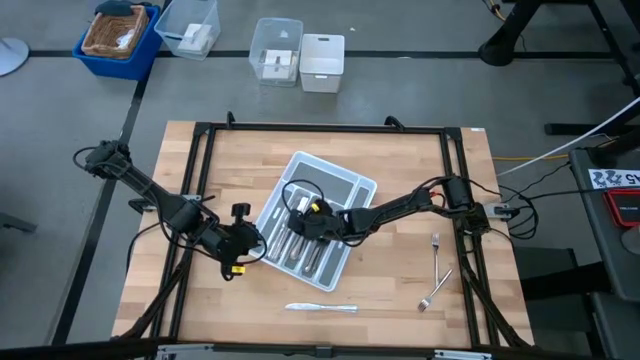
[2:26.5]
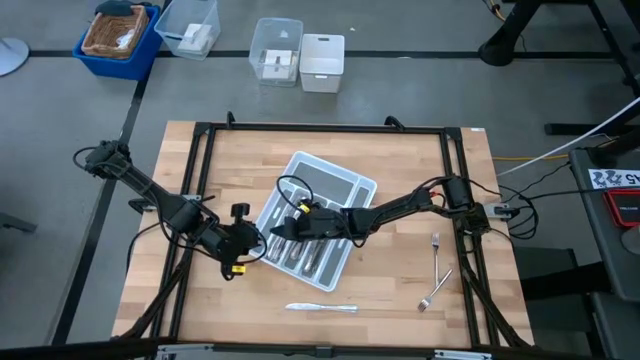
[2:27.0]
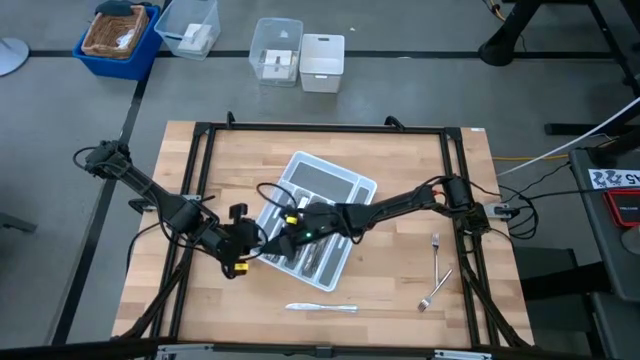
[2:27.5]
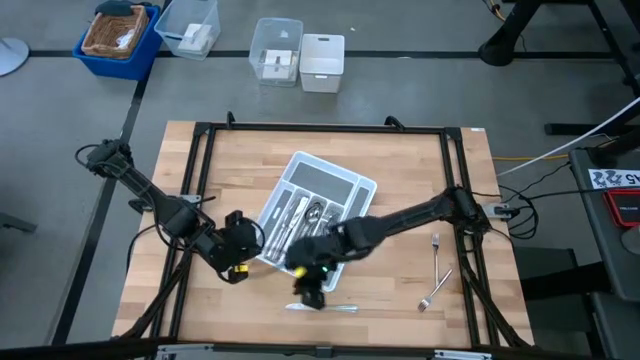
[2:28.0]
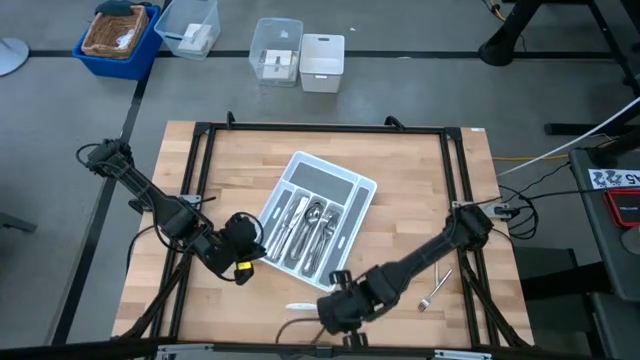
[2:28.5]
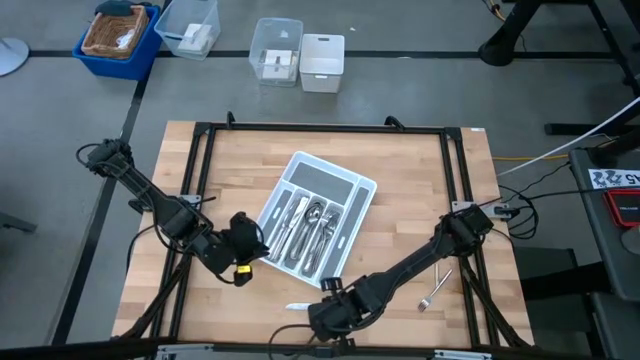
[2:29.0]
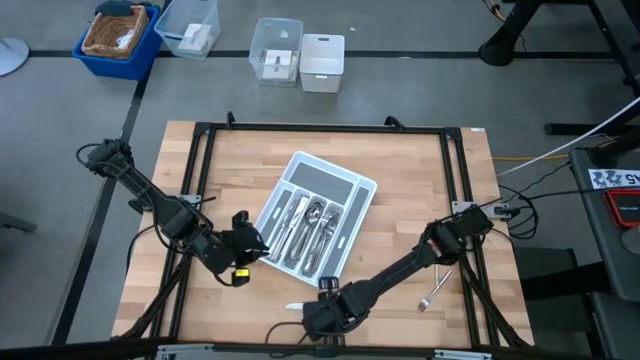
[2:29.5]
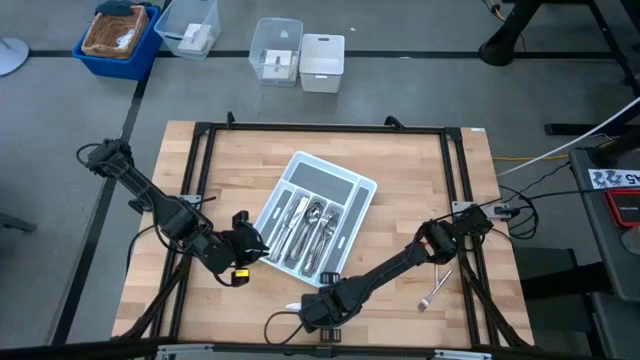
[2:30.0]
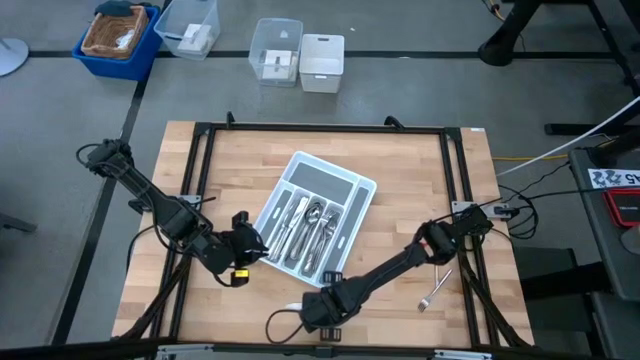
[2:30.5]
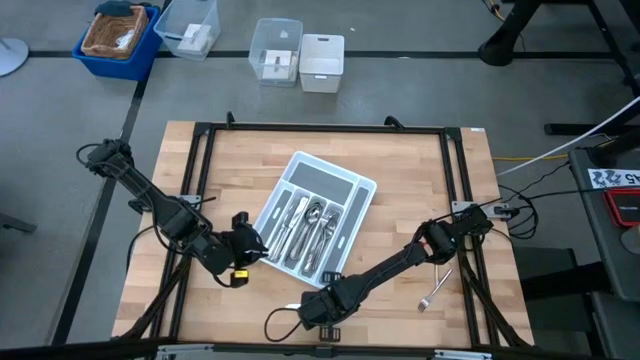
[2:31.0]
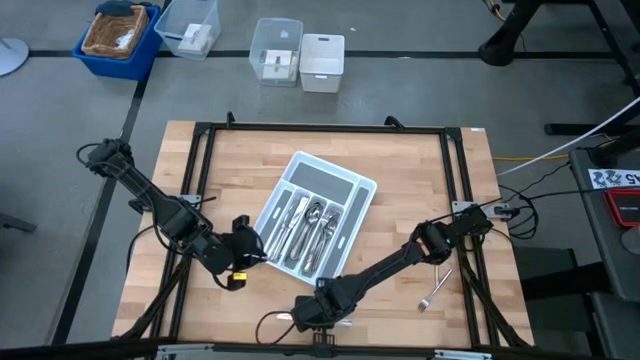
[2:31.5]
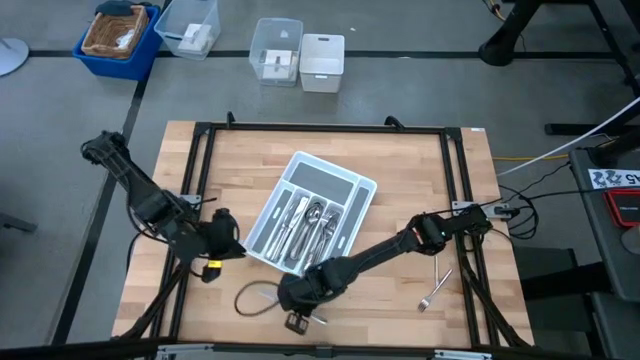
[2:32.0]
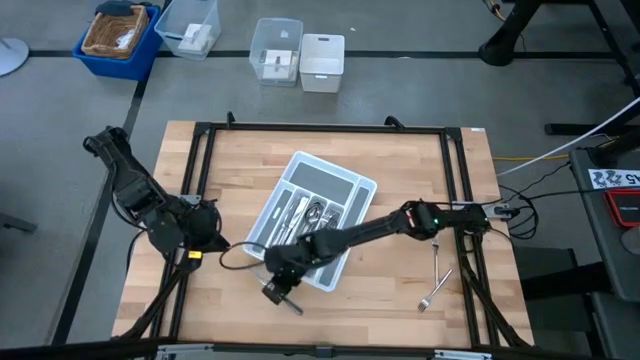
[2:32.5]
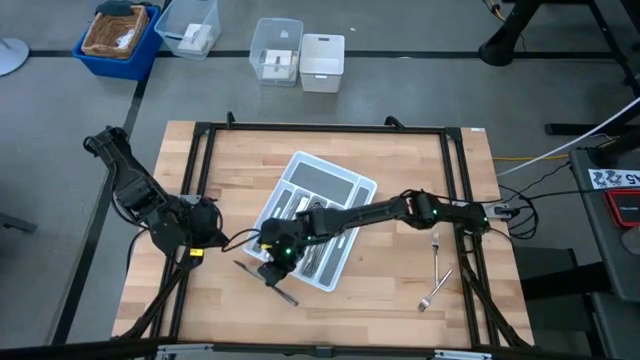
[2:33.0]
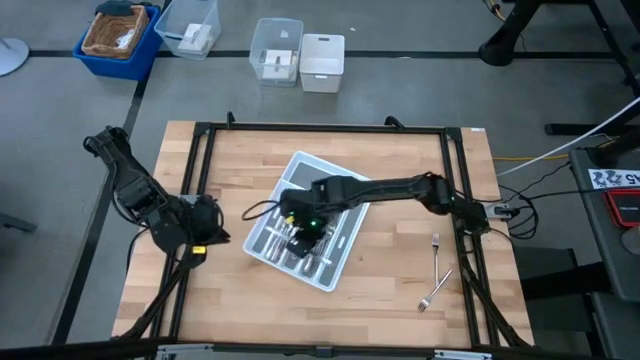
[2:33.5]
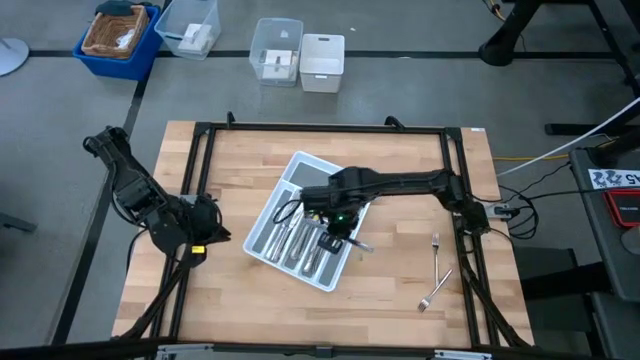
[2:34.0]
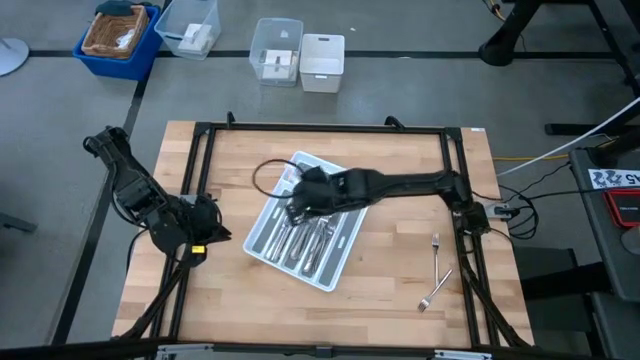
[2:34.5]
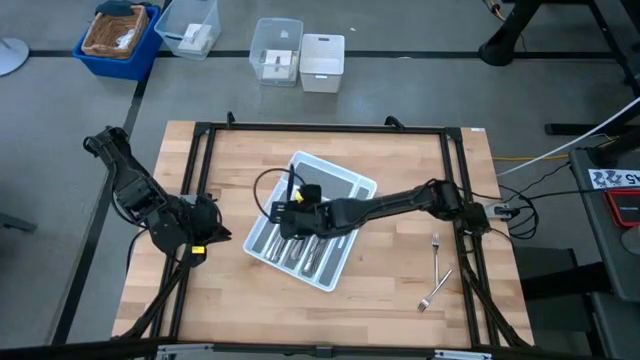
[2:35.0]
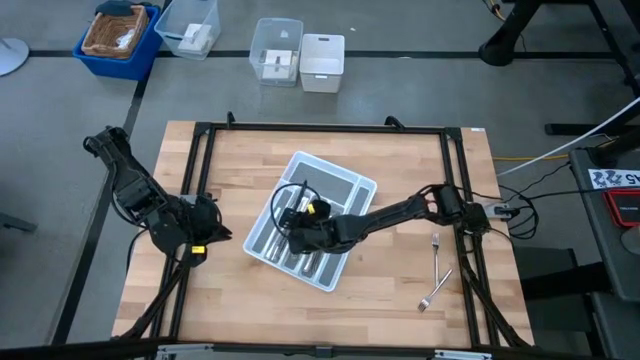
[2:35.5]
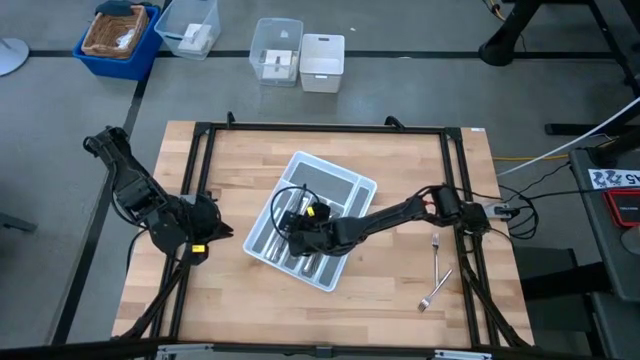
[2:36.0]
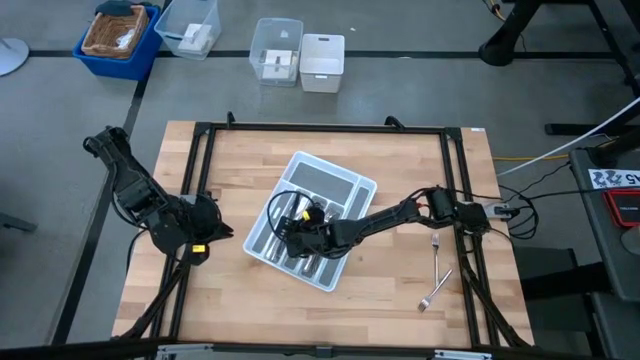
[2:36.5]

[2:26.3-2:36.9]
Task: Sort silverware
Put the silver knife into the white cutlery tray

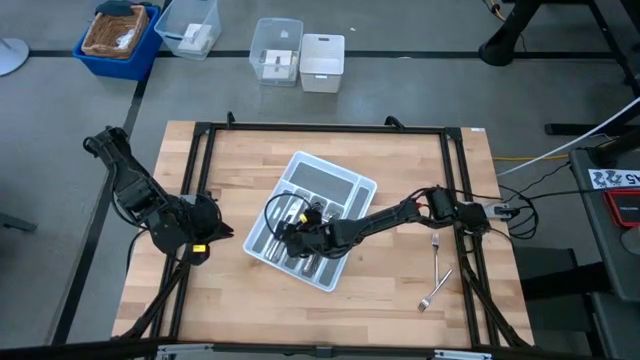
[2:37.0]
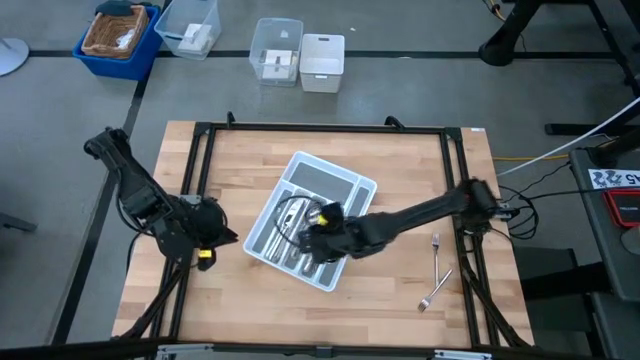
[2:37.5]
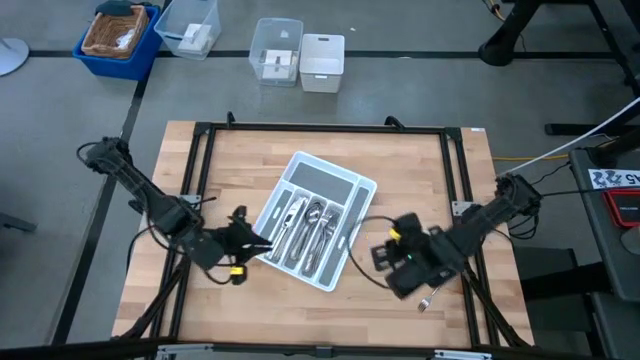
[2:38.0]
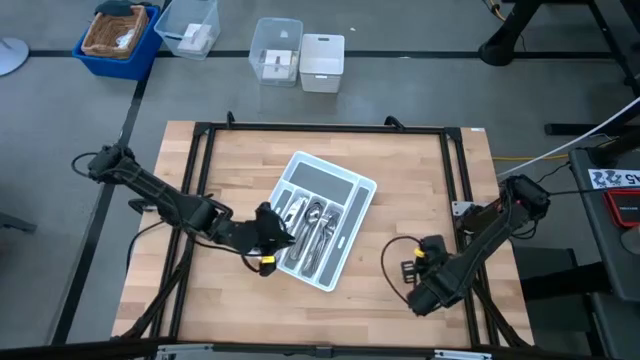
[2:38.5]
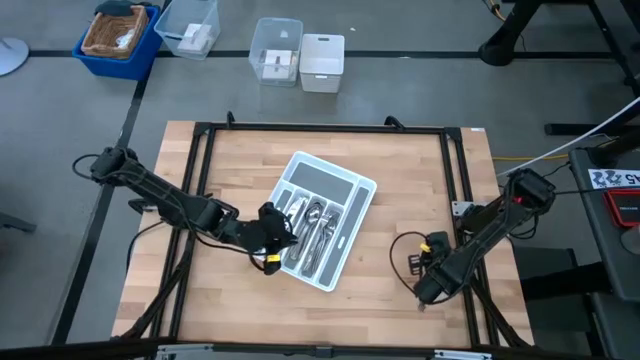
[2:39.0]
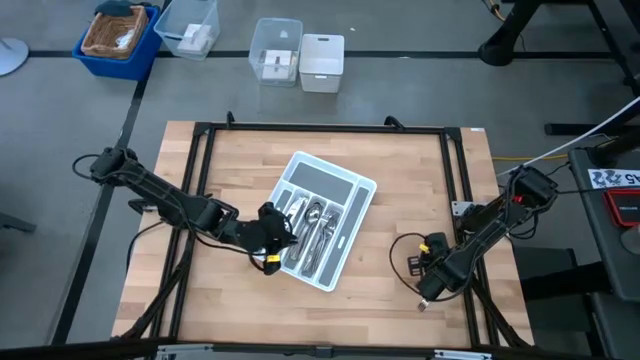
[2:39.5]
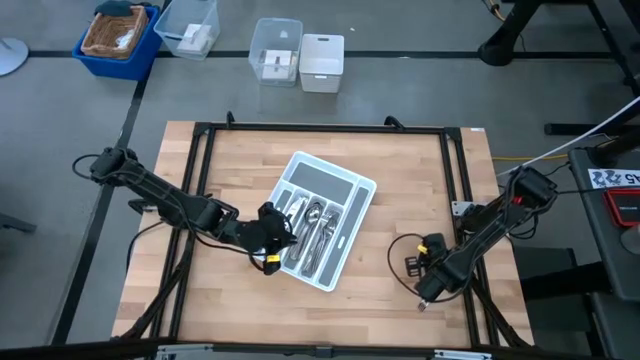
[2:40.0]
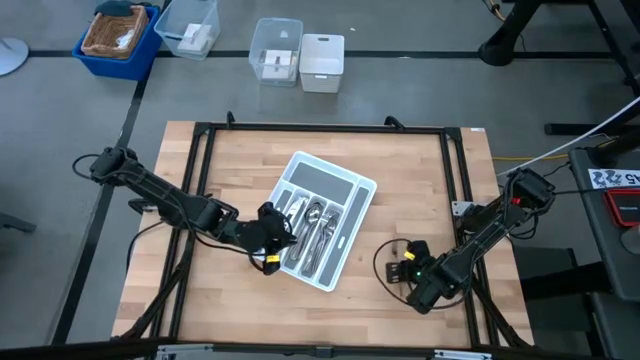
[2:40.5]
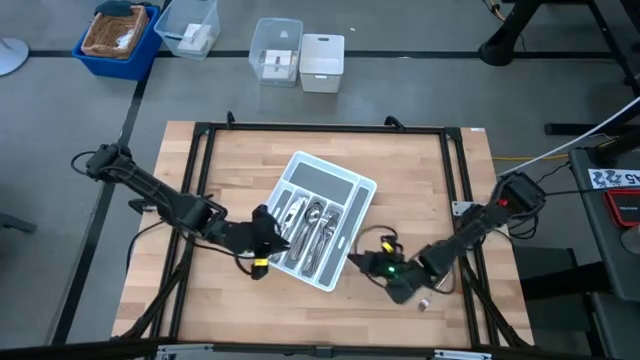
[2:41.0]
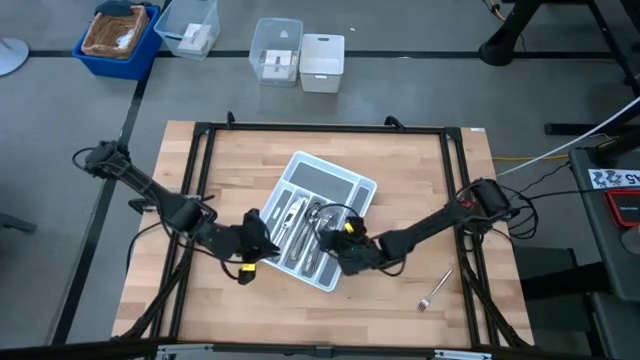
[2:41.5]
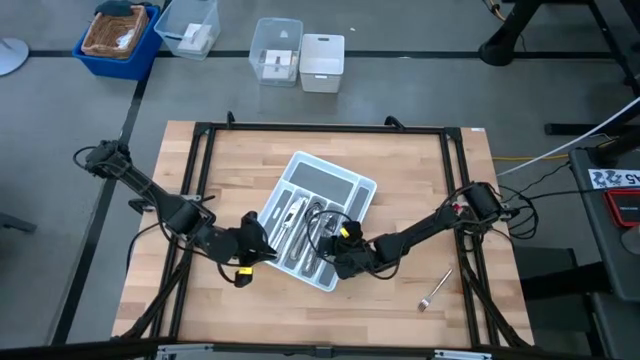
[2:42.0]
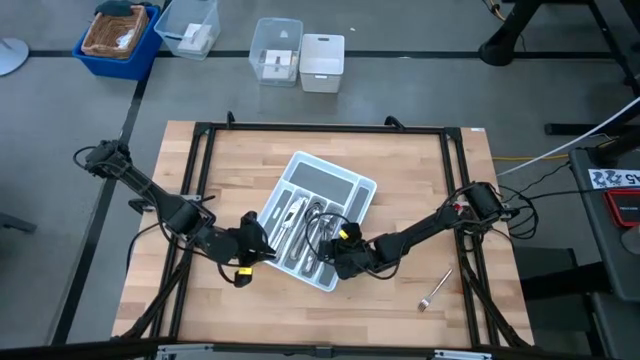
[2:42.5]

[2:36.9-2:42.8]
Put the silver fork into the white cutlery tray

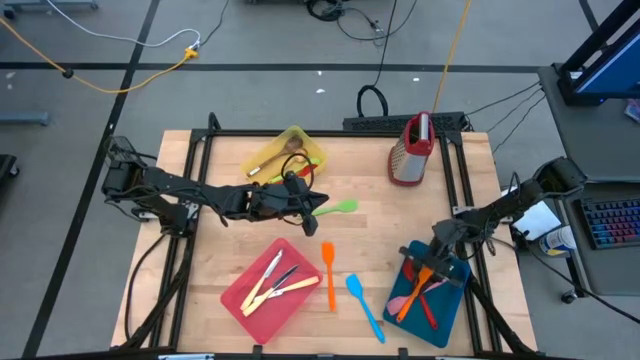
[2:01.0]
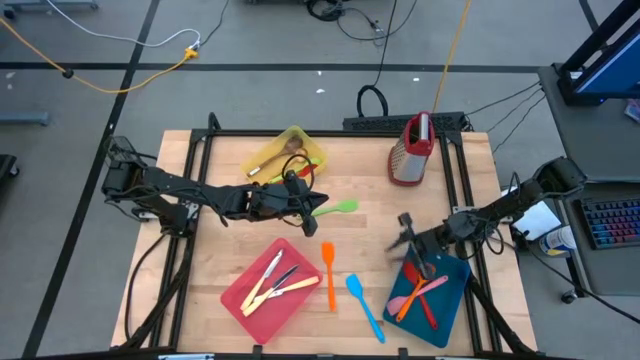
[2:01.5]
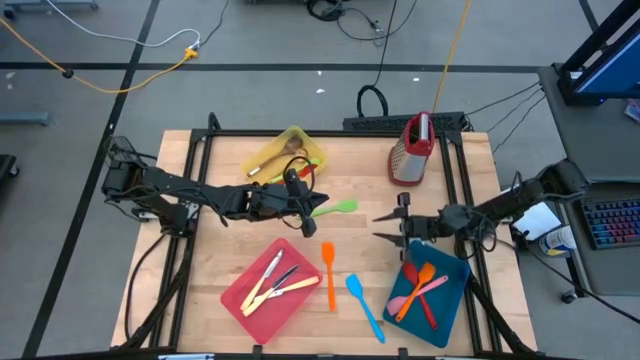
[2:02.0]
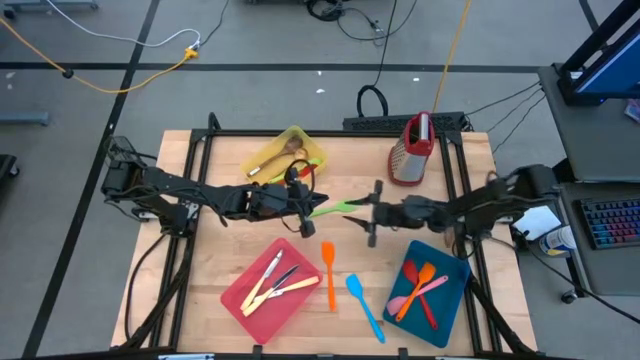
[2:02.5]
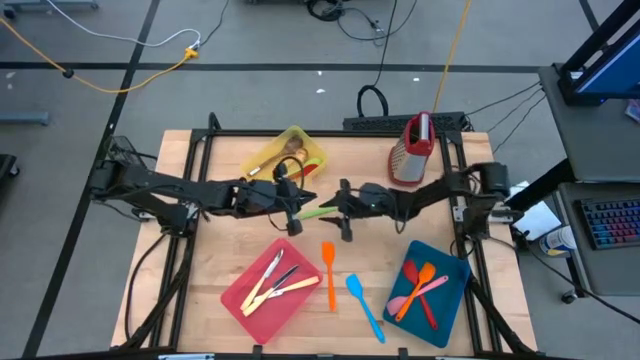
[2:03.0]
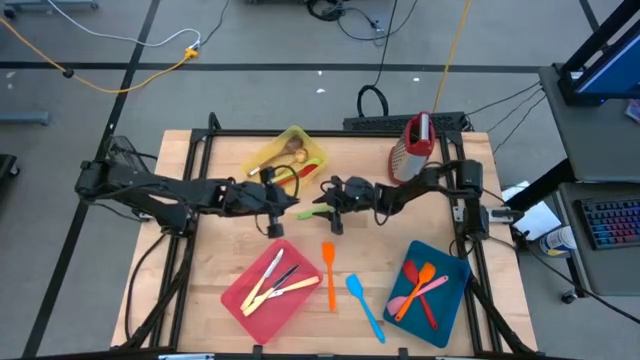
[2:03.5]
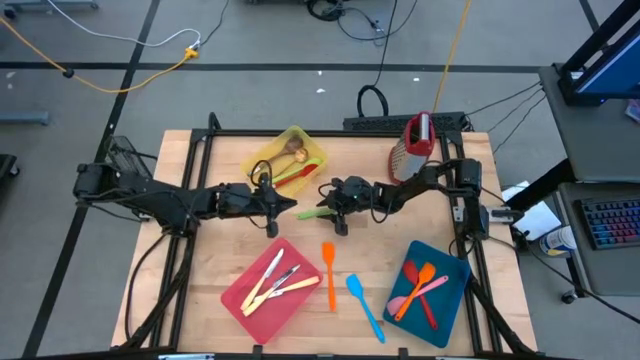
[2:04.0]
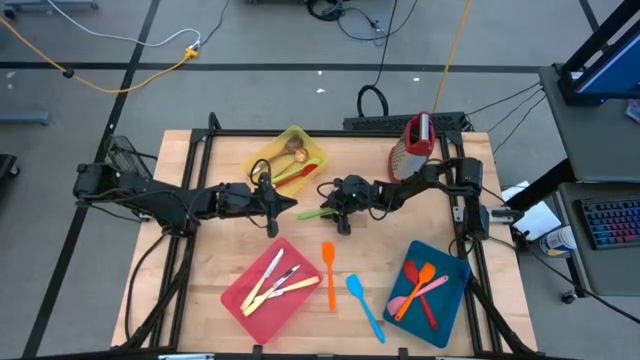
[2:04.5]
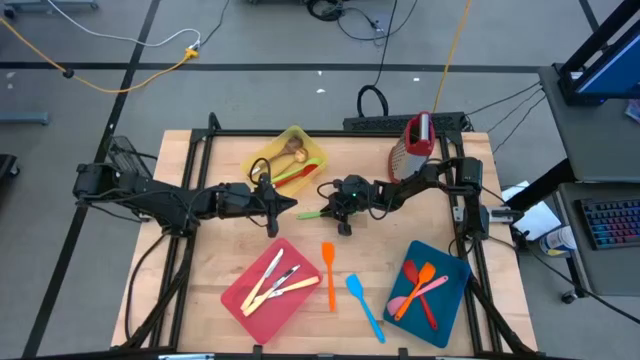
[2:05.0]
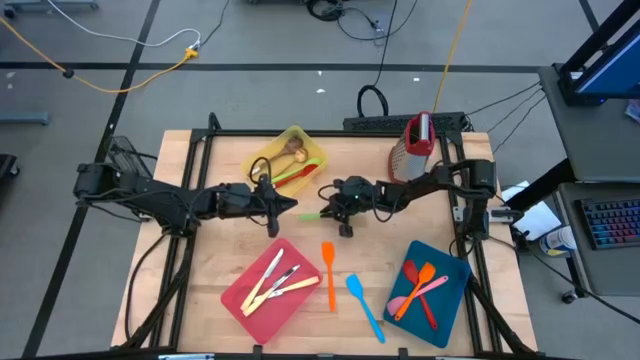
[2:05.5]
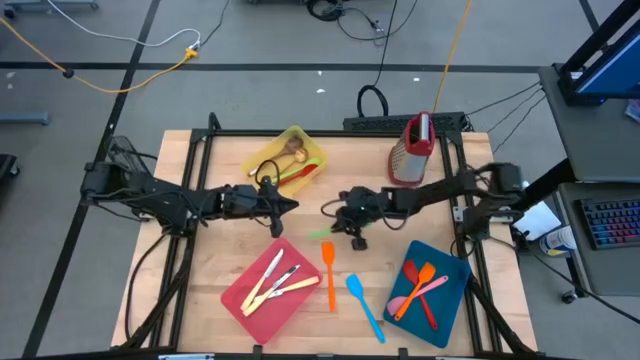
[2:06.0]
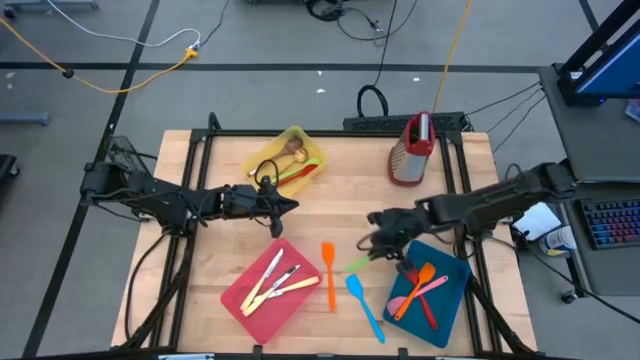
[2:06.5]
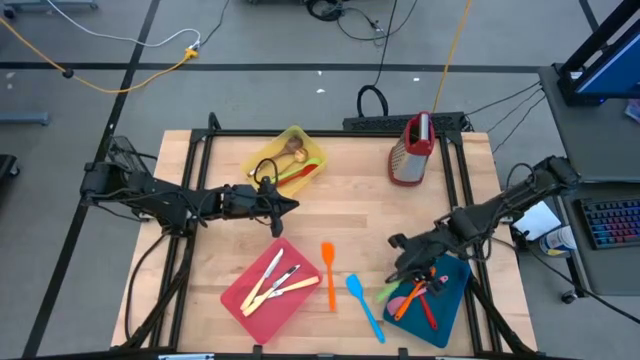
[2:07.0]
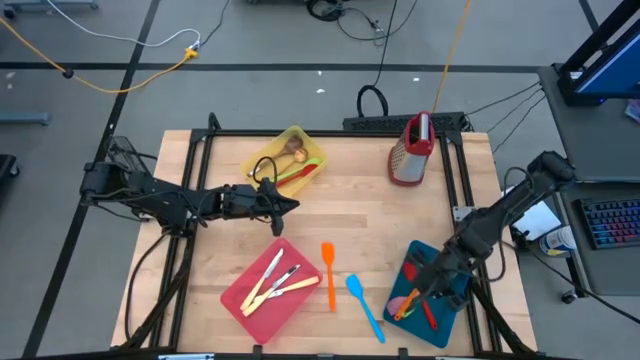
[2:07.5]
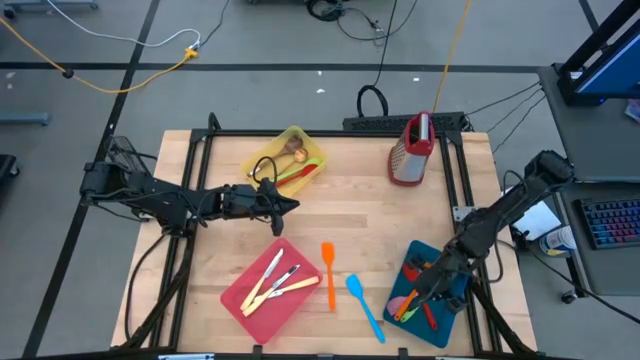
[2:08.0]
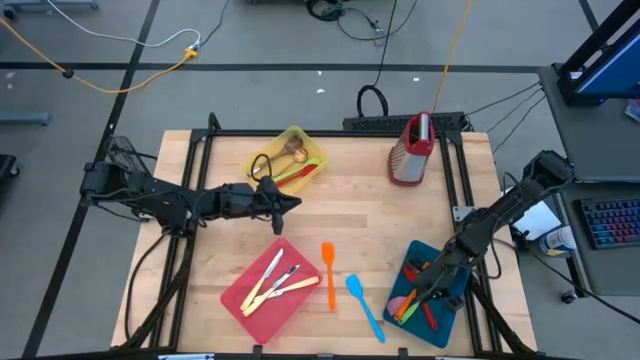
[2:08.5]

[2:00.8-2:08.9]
Task: Pick & Place Kitchen Items
Put the green spatula into the blue bin
